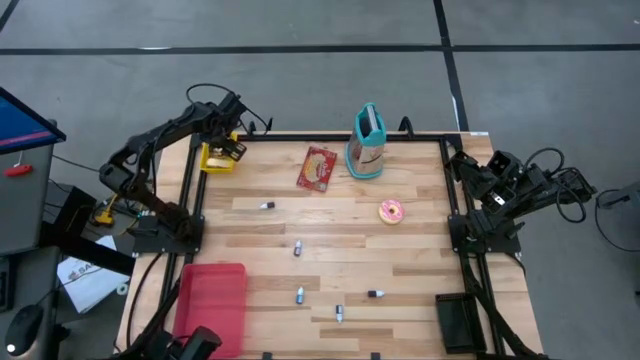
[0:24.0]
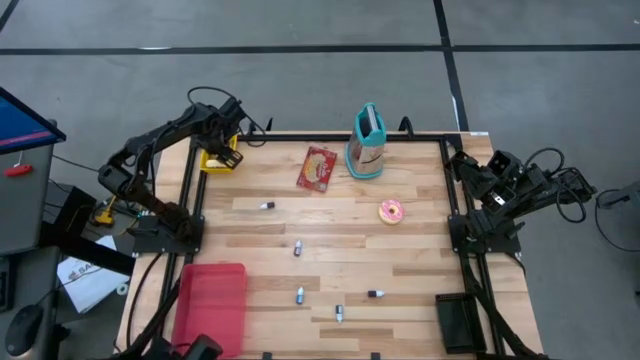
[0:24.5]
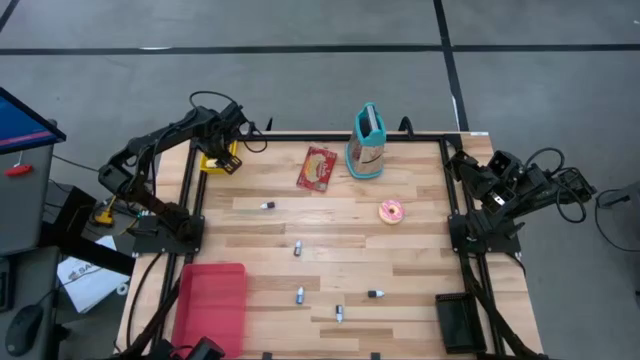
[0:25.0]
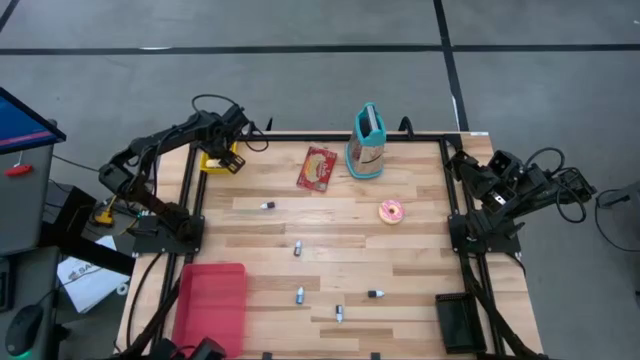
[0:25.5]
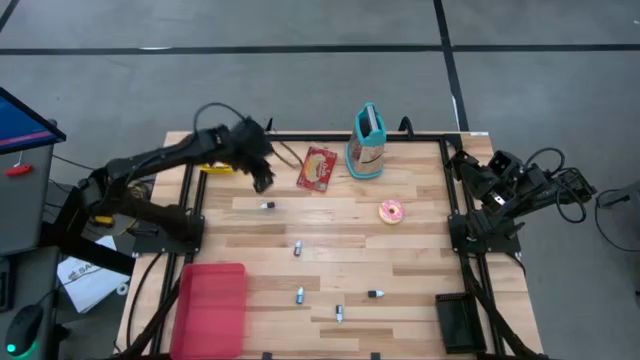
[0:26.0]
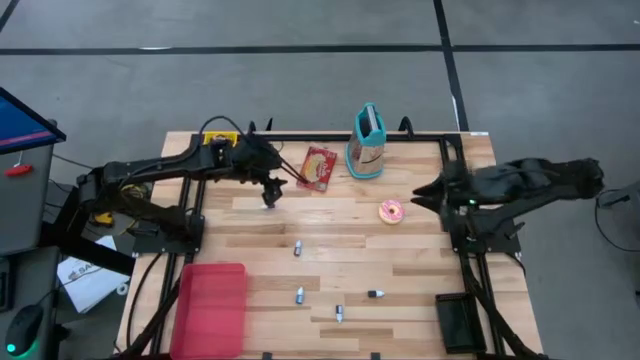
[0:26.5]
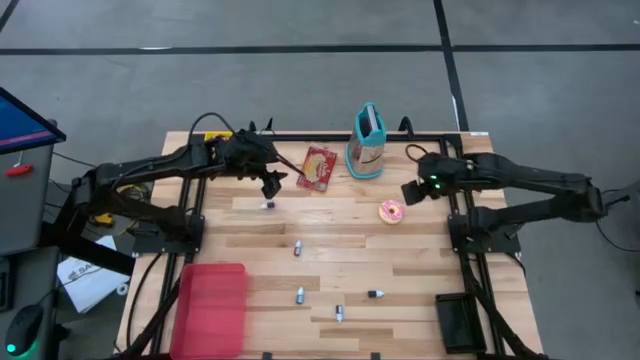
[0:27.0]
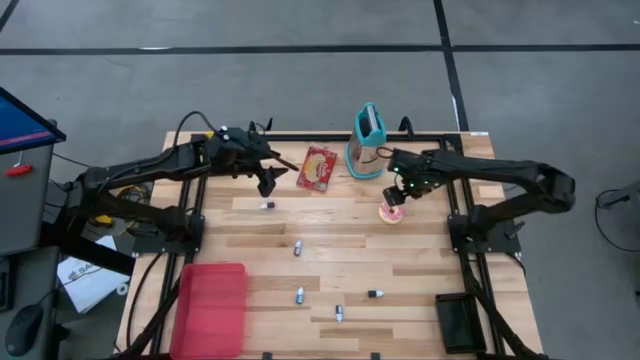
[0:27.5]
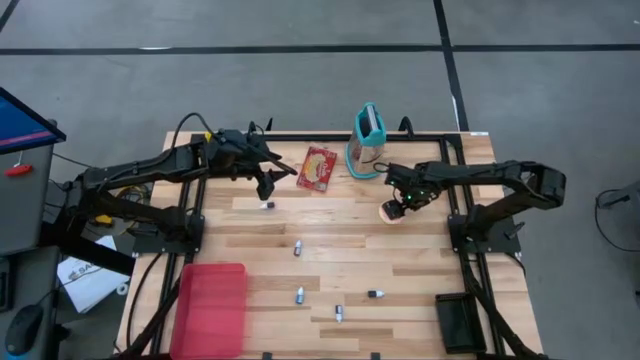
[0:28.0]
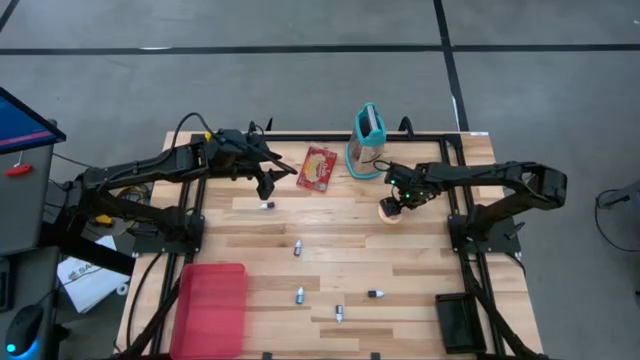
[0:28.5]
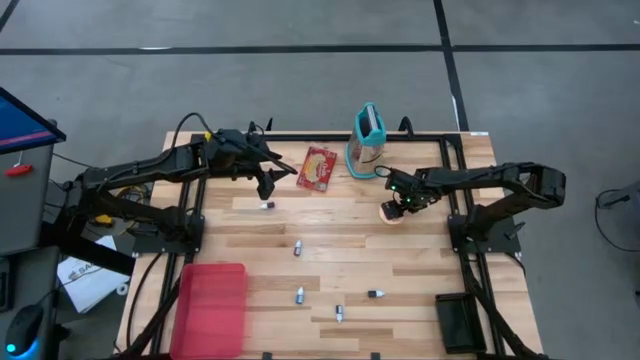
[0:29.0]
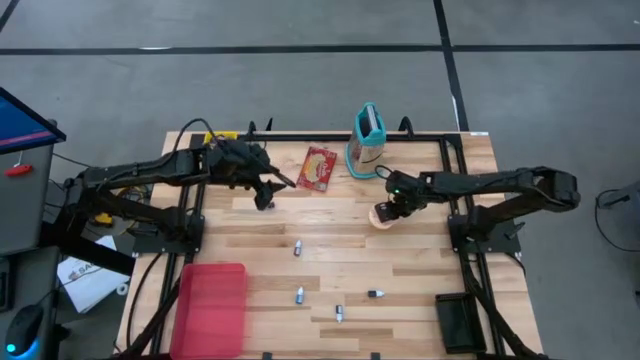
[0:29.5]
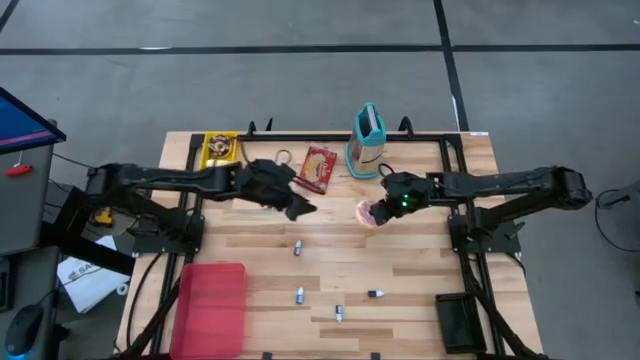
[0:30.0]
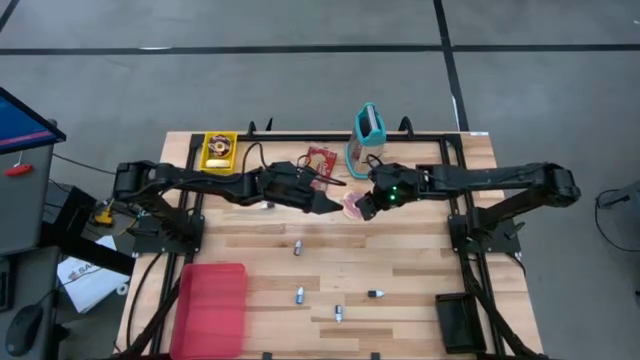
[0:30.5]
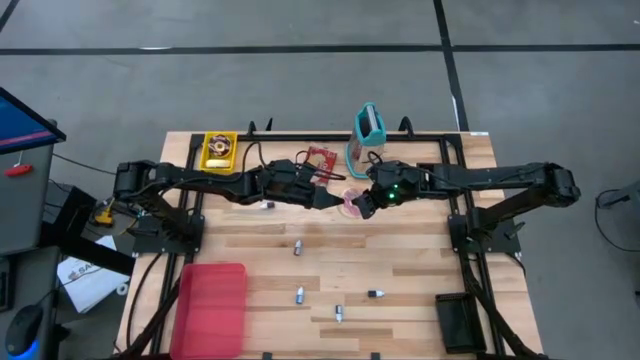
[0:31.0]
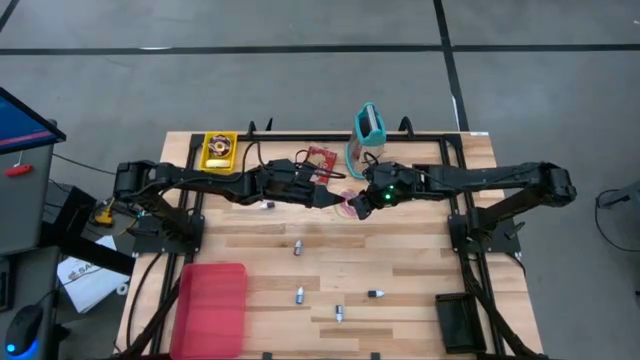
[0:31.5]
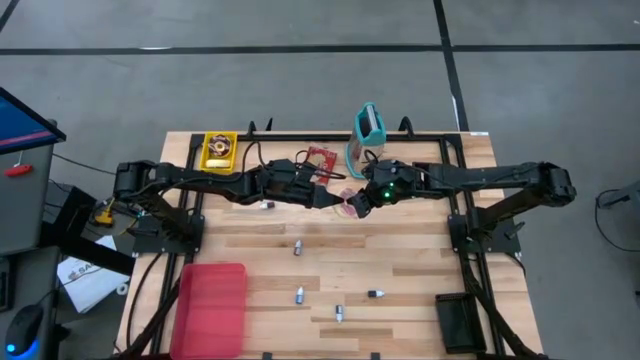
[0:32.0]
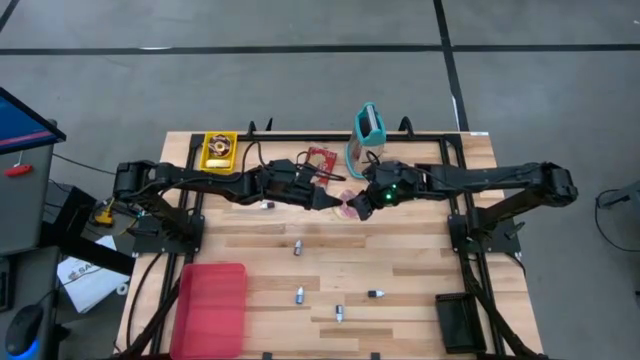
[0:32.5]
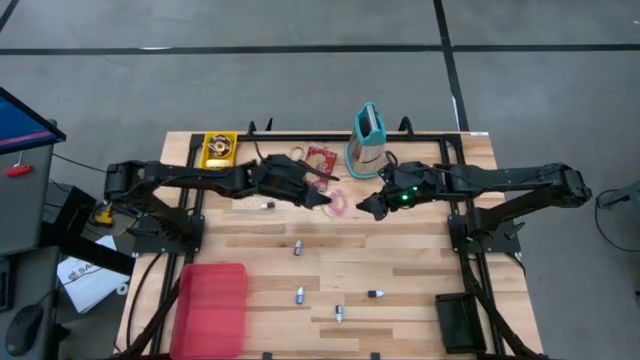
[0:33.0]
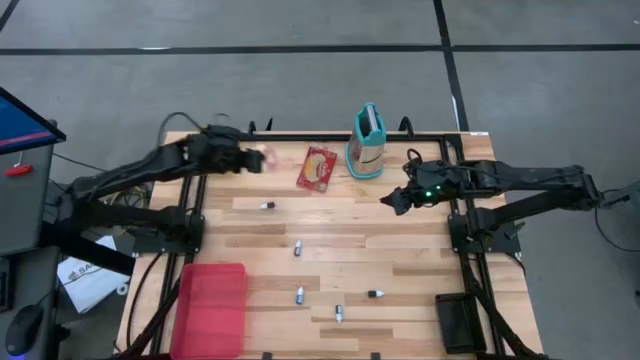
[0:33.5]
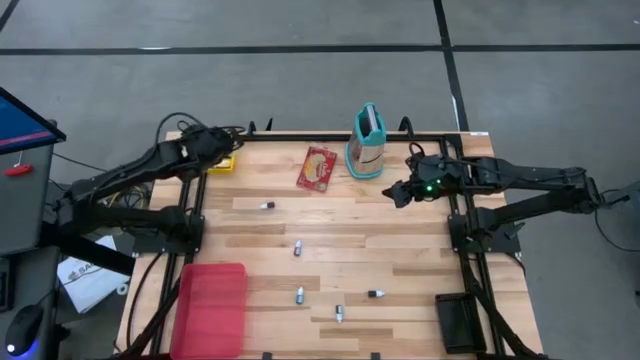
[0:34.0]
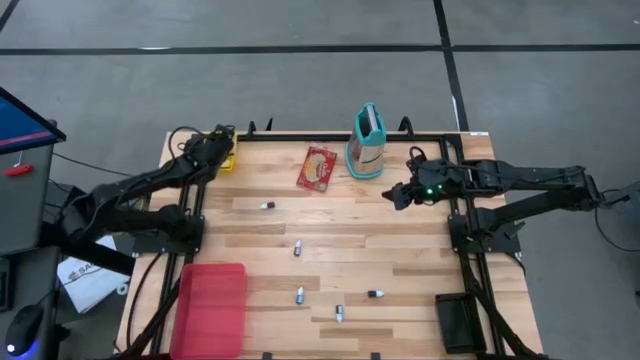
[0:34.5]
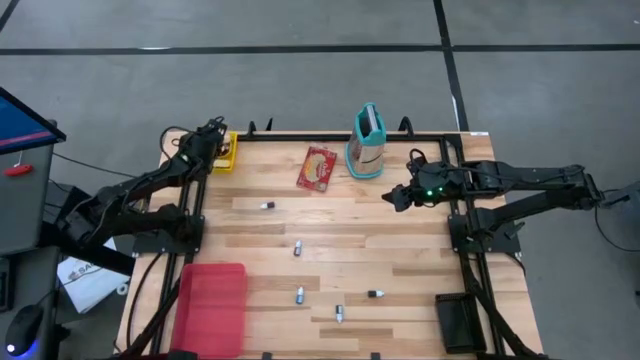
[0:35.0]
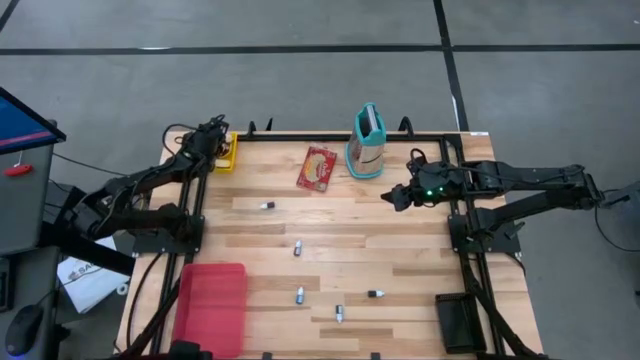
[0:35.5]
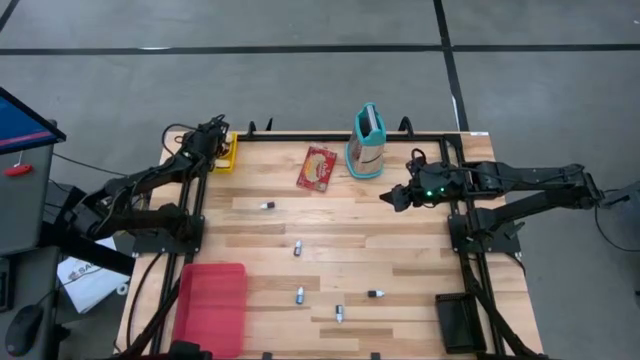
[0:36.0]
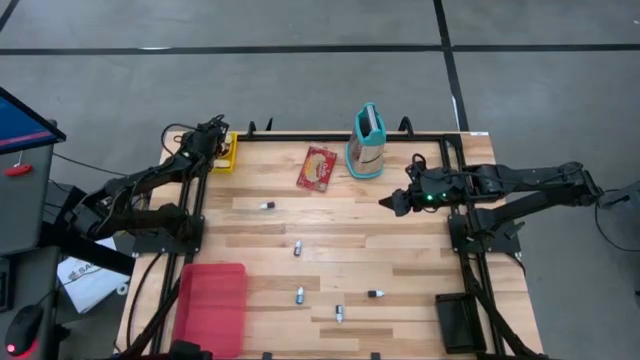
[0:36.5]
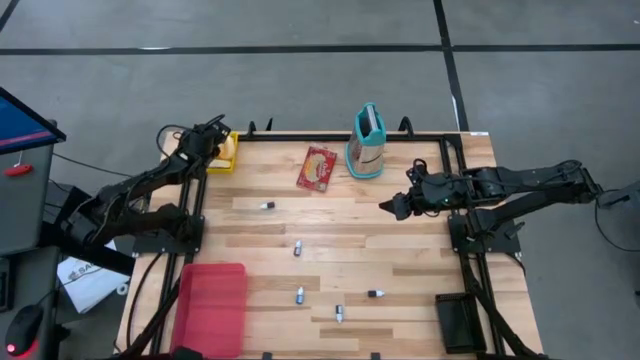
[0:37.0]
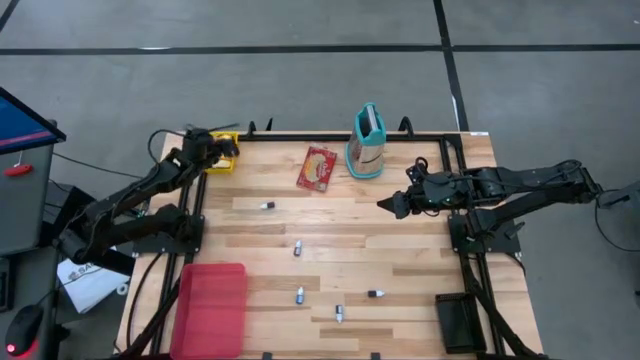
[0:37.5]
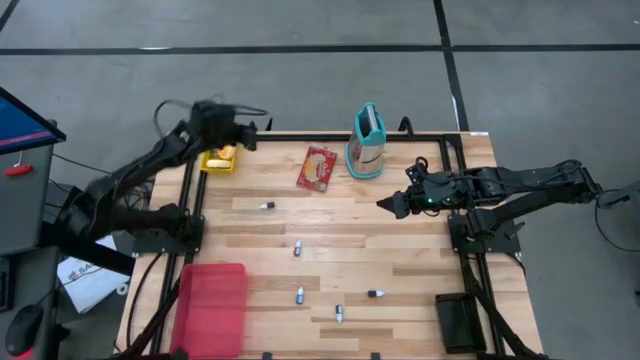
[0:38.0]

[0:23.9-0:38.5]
Put the pink donut into the yellow basket
